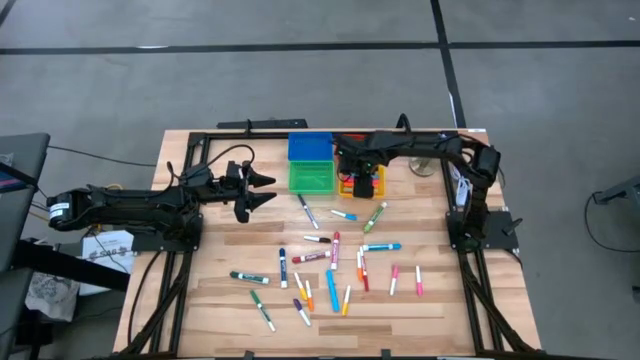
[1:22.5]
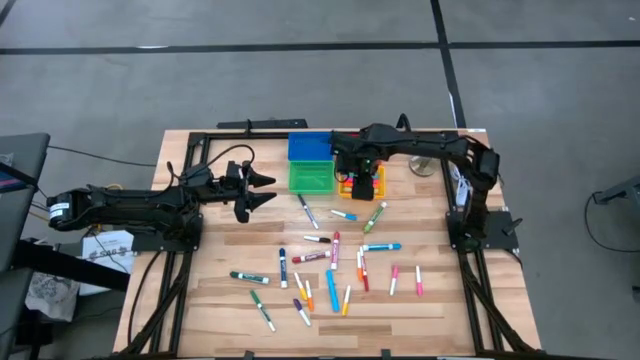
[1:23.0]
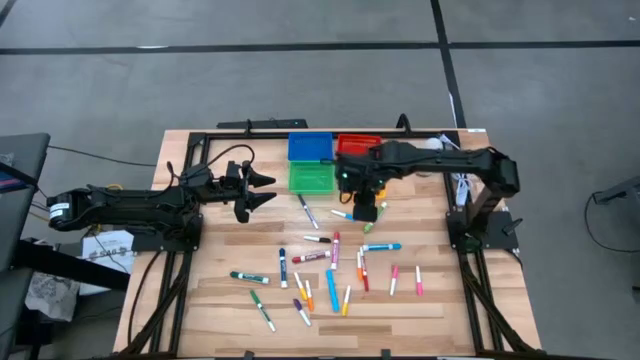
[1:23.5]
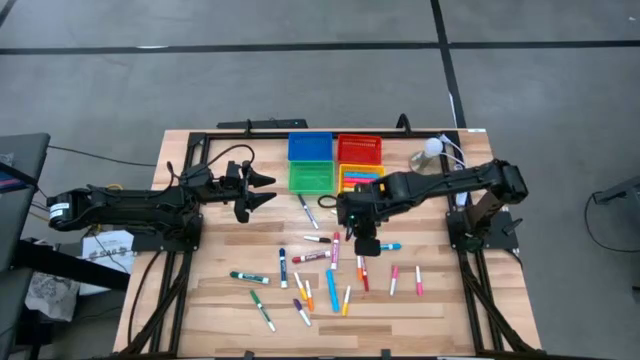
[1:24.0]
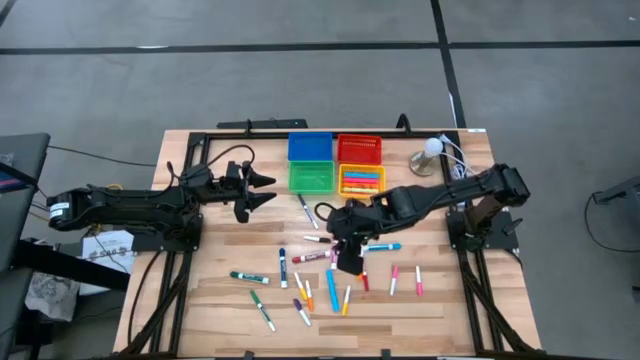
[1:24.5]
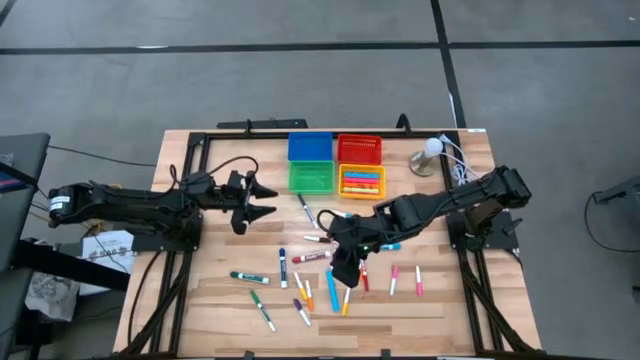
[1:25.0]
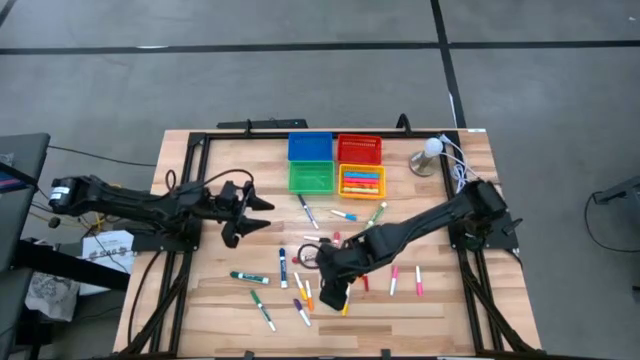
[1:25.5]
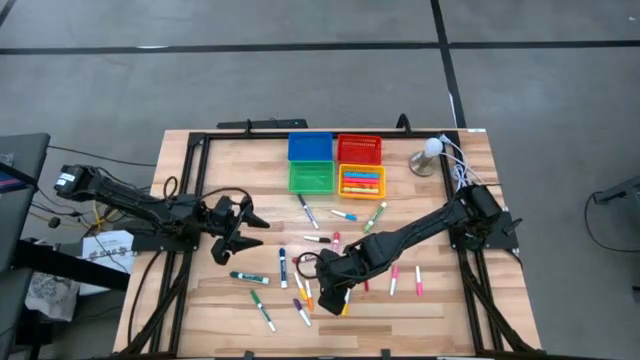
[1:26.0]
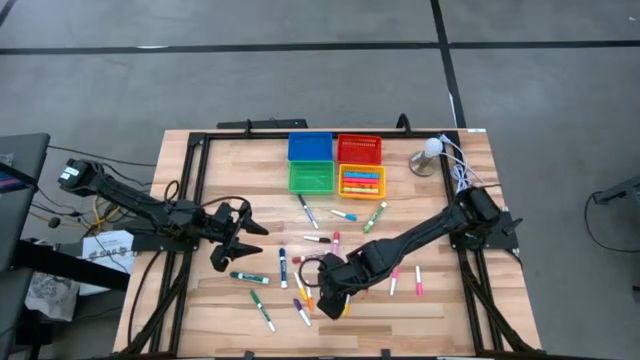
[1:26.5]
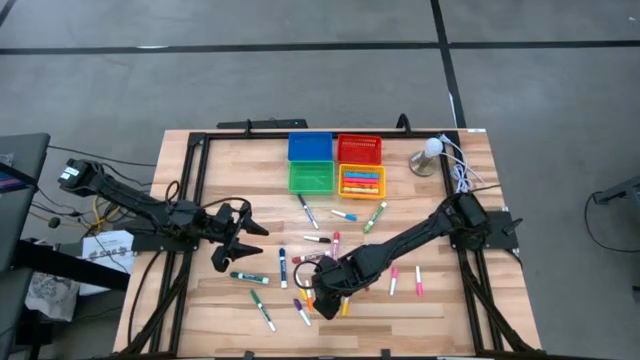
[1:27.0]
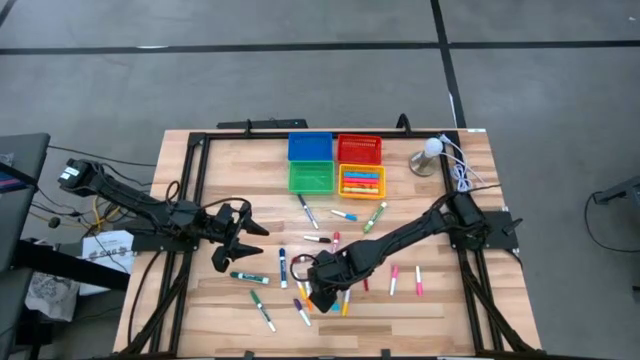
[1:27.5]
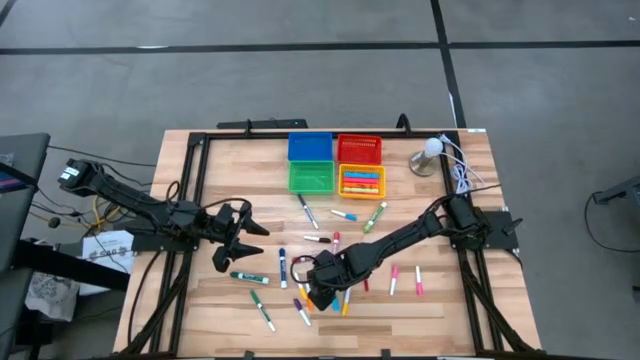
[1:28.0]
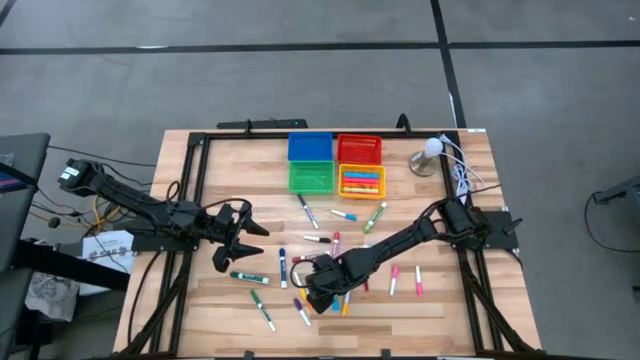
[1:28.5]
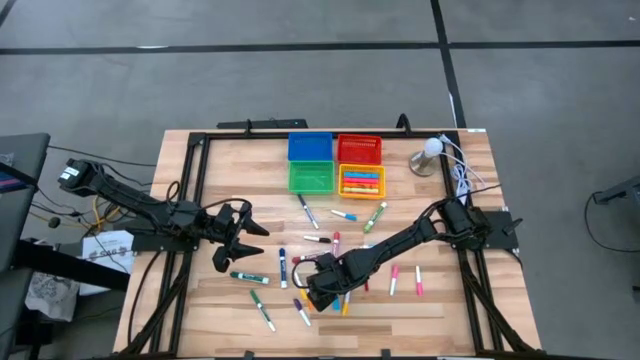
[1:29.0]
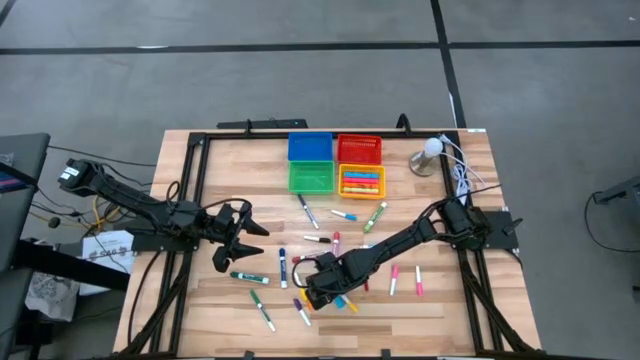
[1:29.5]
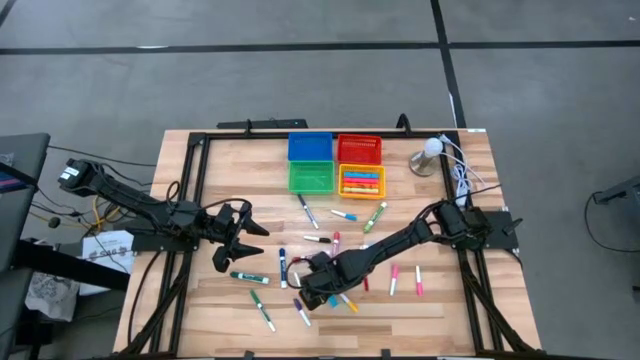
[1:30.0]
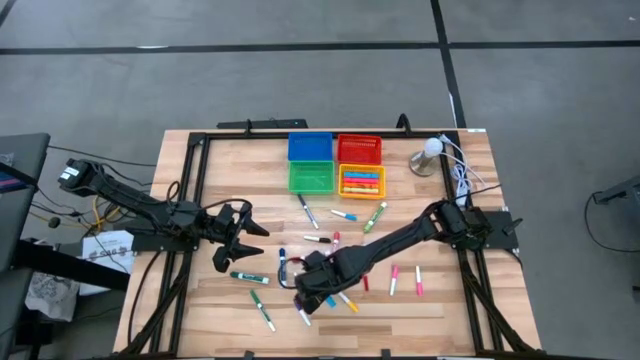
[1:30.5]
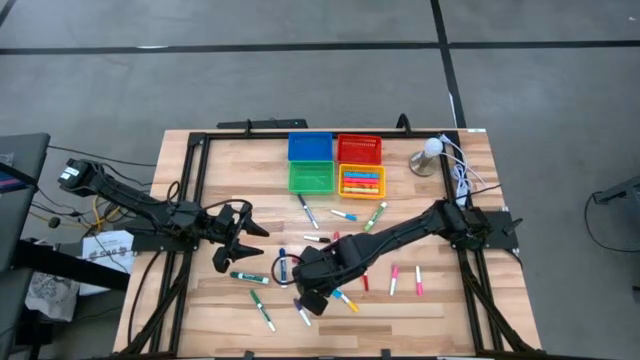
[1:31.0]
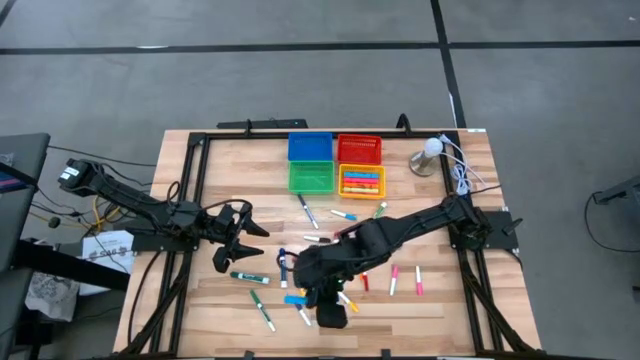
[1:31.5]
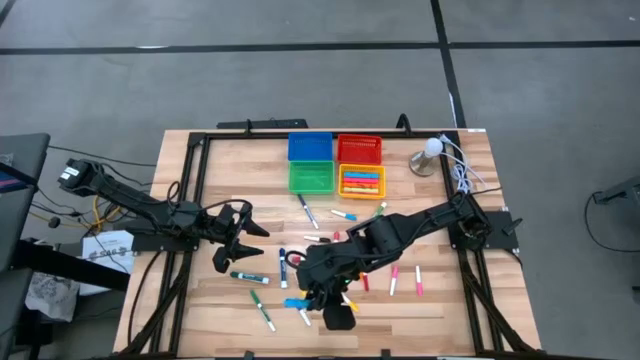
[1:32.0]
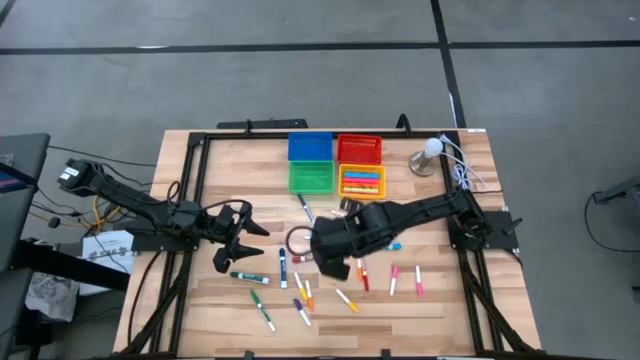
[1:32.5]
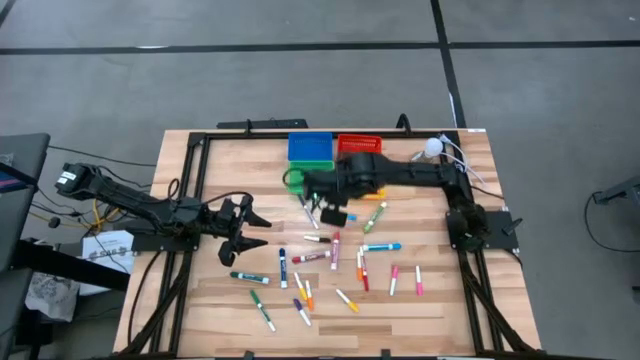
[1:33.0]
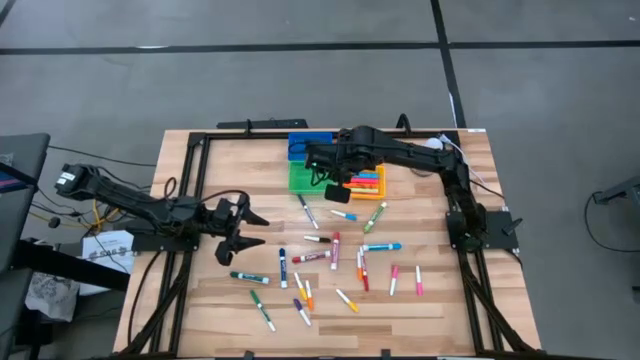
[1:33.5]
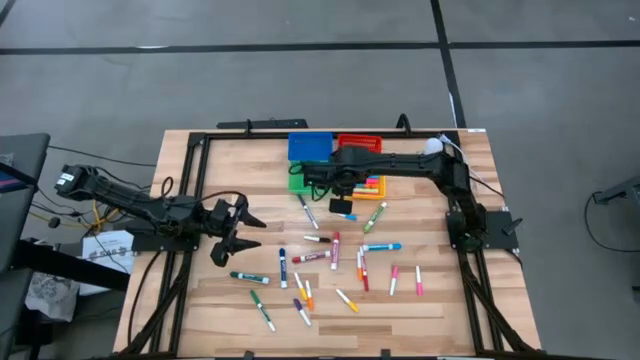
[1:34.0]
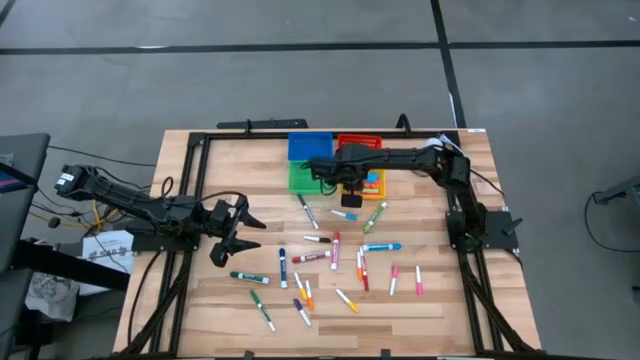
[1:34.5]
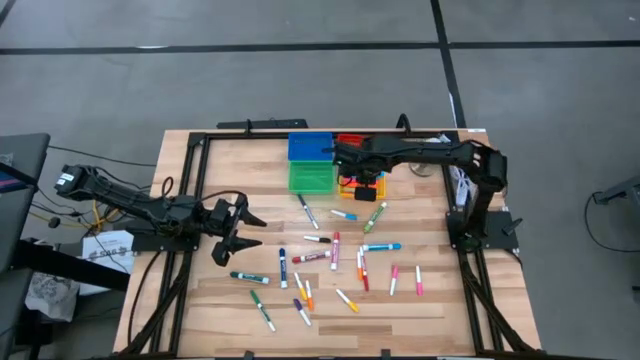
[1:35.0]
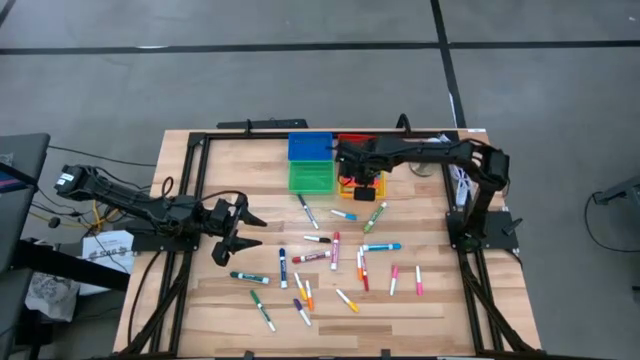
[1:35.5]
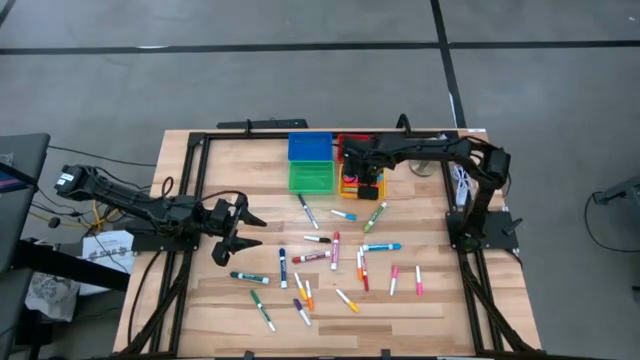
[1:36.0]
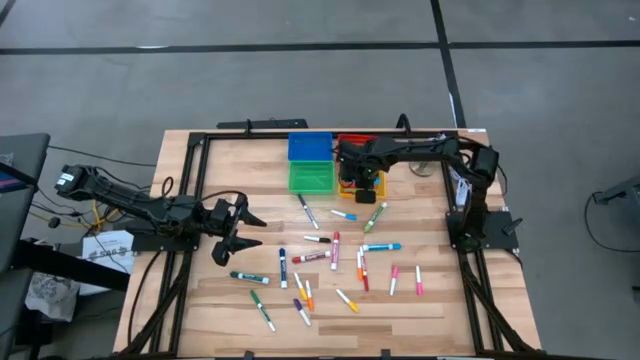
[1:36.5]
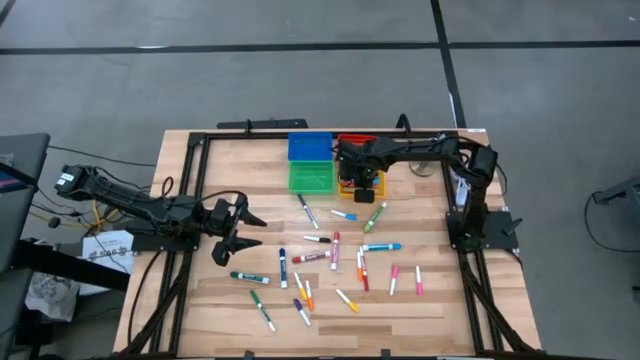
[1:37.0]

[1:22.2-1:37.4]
Task: Pick & Place Markers
Put the large blue highlighter pen into the yellow bin

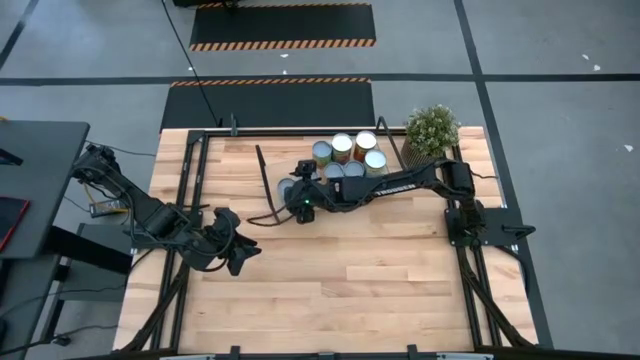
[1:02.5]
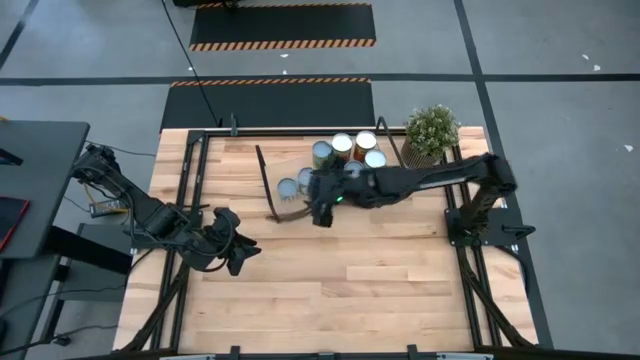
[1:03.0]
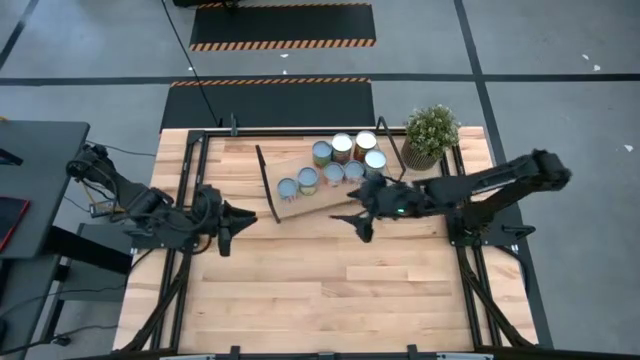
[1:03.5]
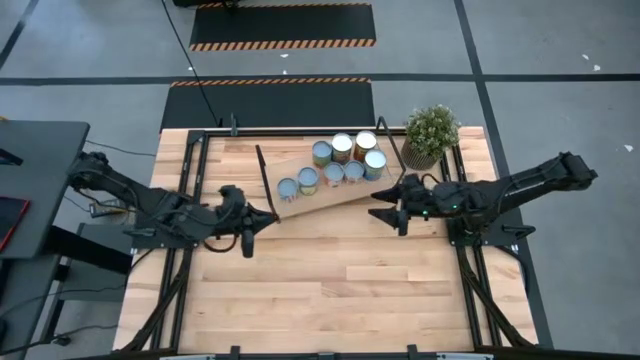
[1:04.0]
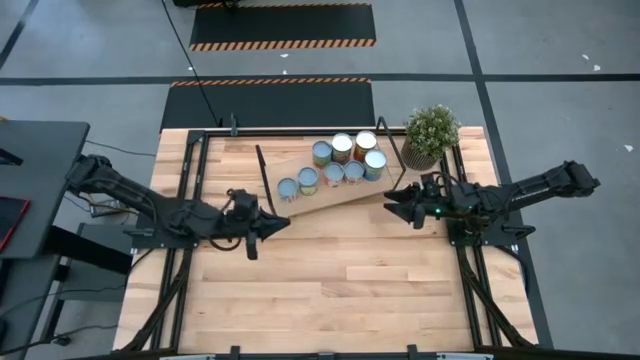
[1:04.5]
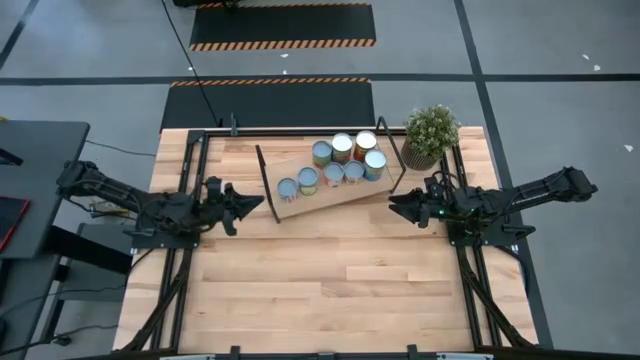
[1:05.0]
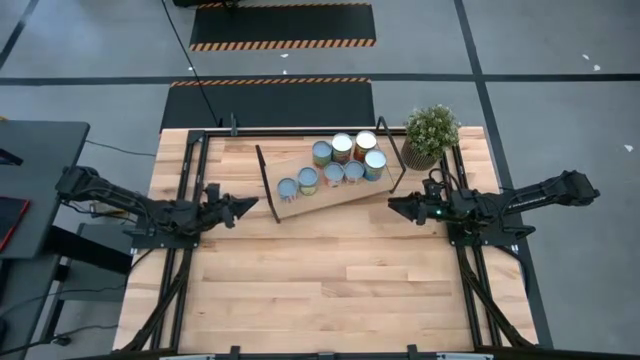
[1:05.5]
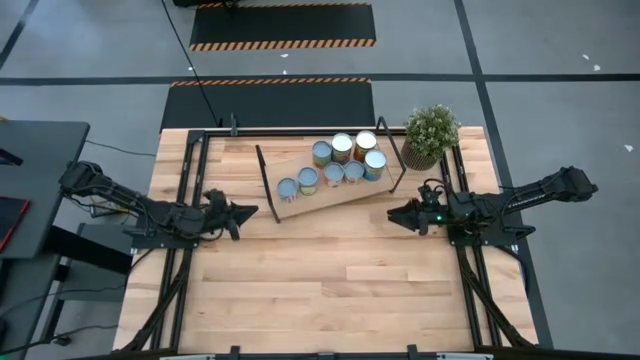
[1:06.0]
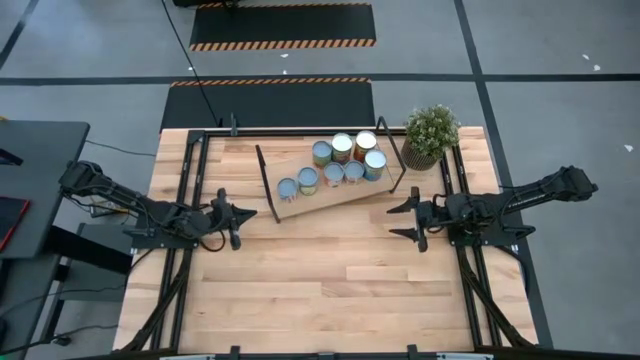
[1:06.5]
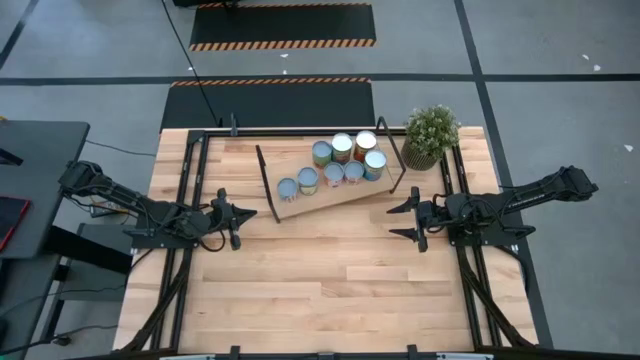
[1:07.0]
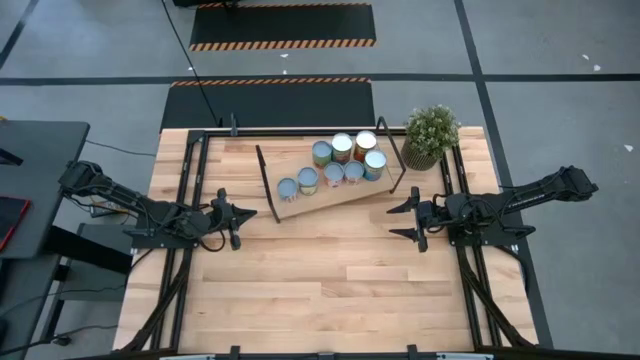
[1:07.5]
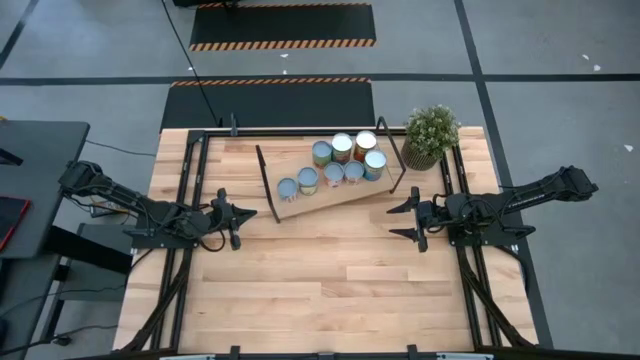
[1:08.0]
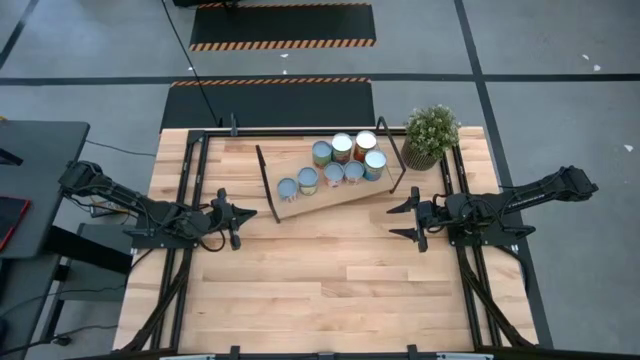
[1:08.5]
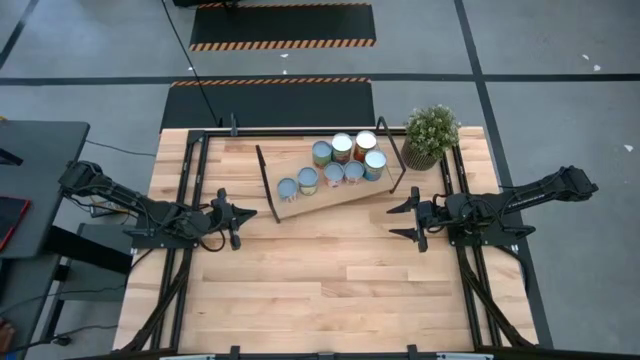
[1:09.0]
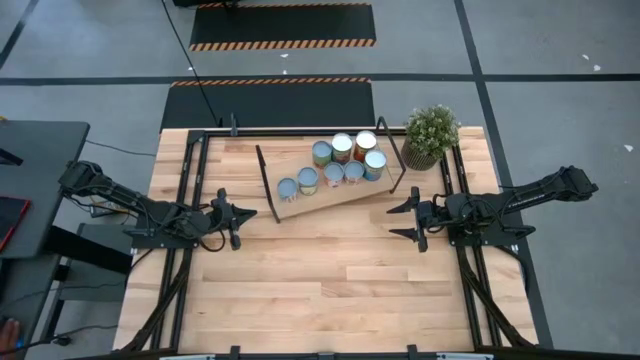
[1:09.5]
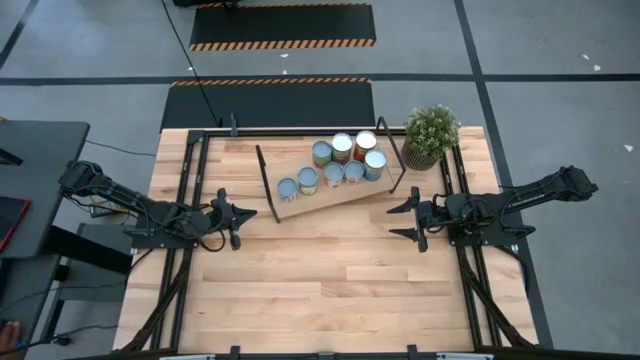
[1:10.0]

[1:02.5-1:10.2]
Task: Pick and place cans onto a shelf
Return to Home Position
